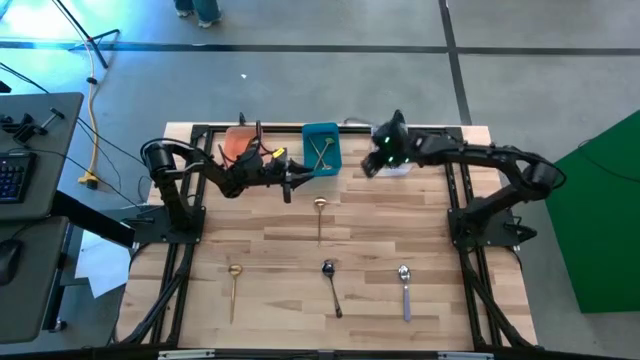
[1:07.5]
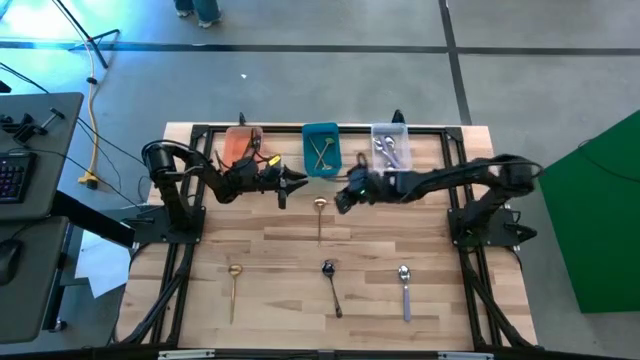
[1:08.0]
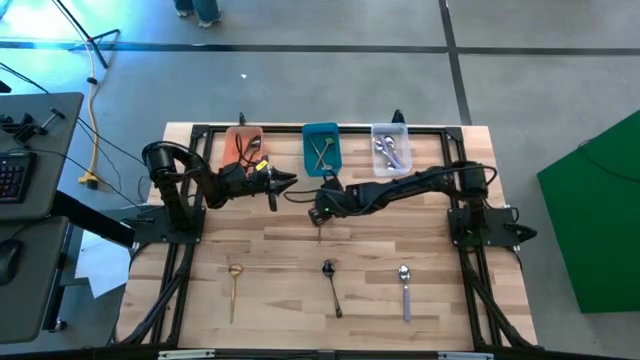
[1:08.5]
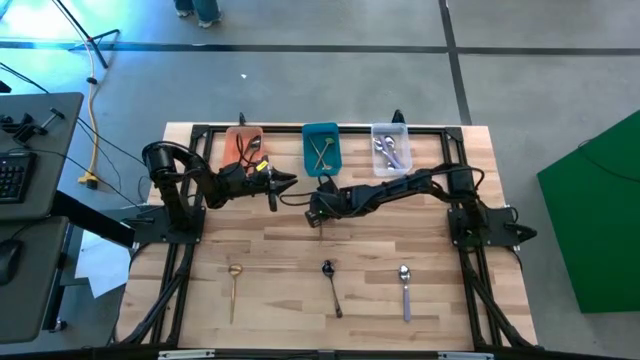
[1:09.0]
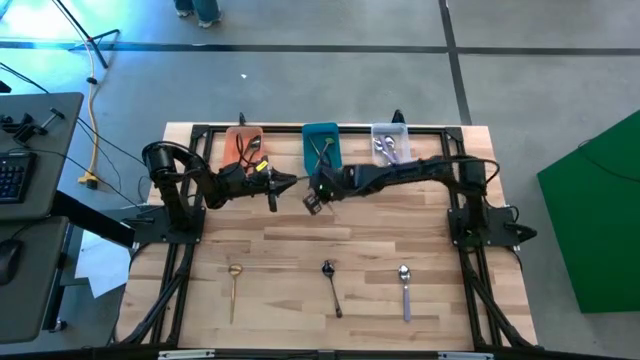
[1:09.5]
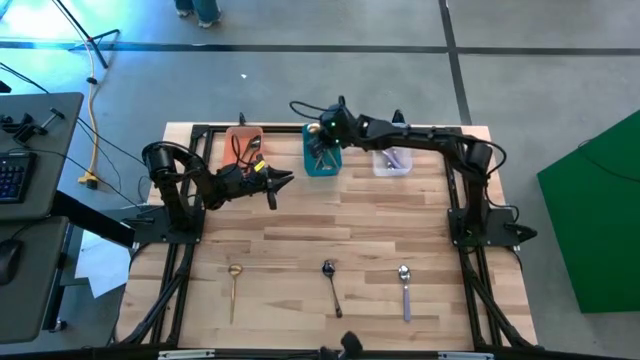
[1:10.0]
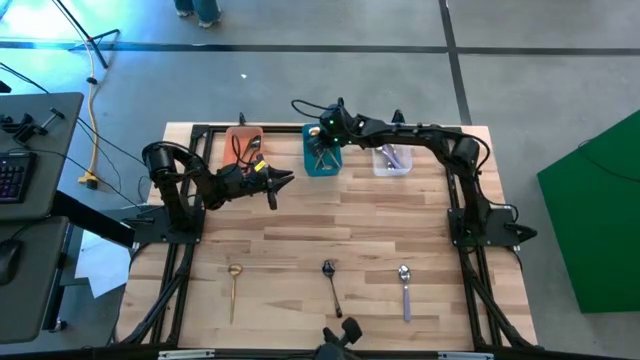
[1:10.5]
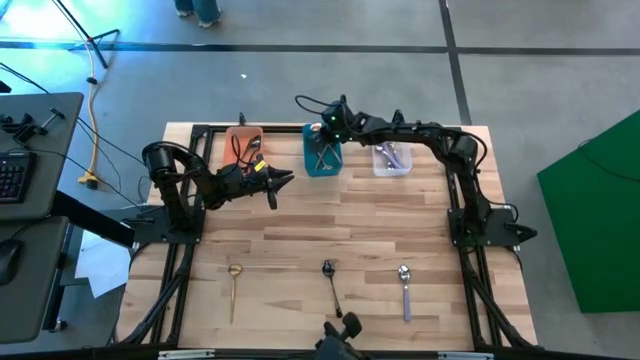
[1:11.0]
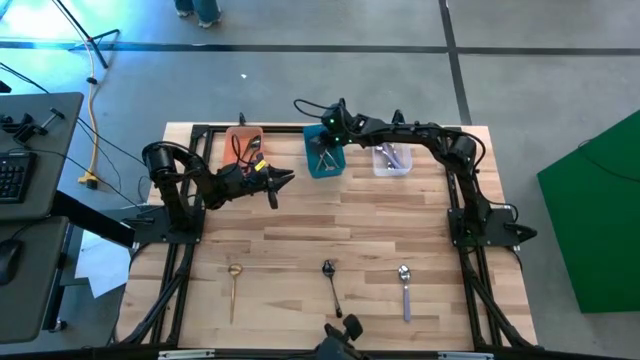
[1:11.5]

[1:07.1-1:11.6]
Task: Sort silverware by color (type)
Put the top gold spoon into the blue bin

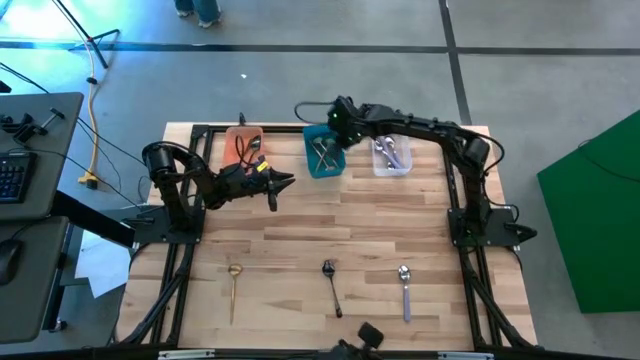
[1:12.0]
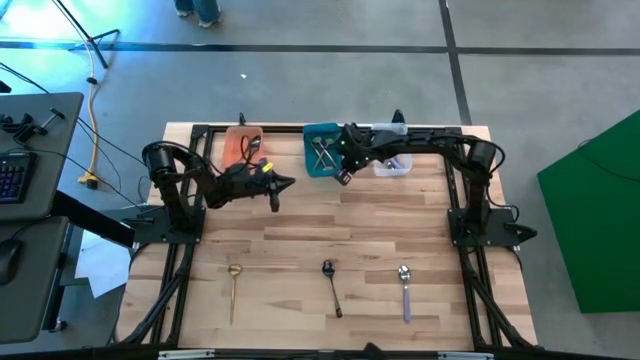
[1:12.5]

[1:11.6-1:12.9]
Adjust the blue bin on the table

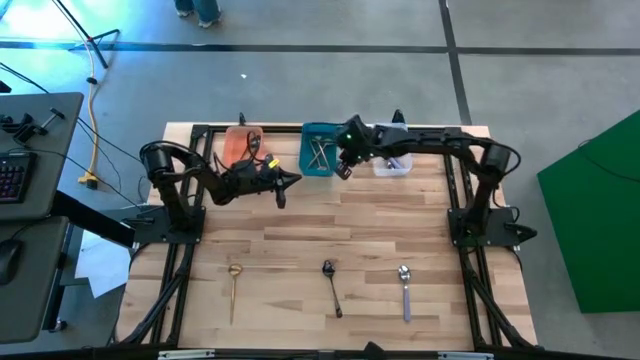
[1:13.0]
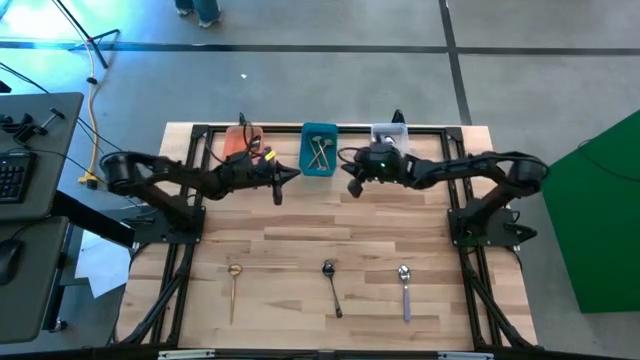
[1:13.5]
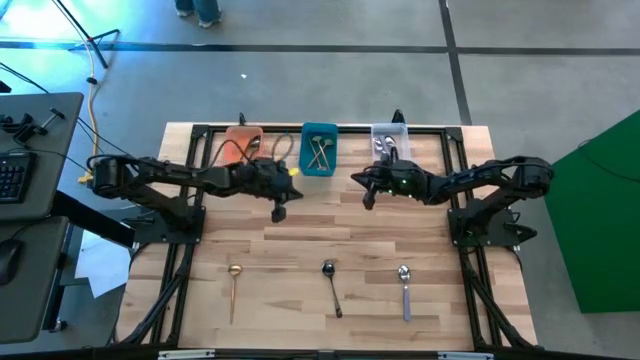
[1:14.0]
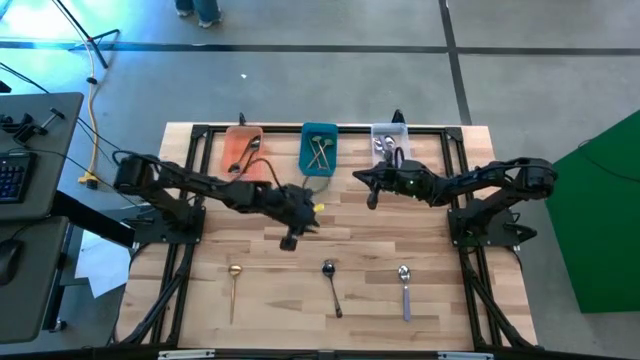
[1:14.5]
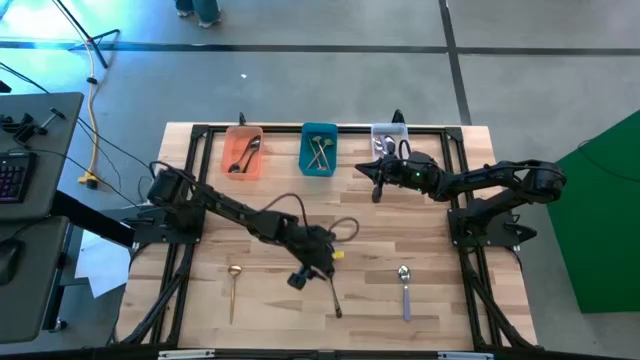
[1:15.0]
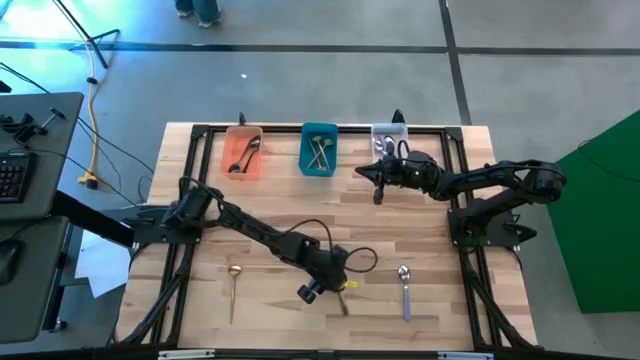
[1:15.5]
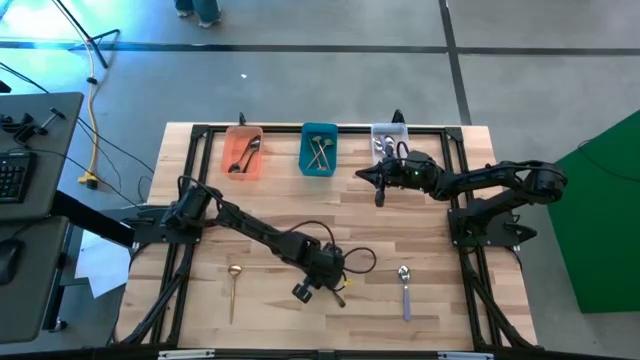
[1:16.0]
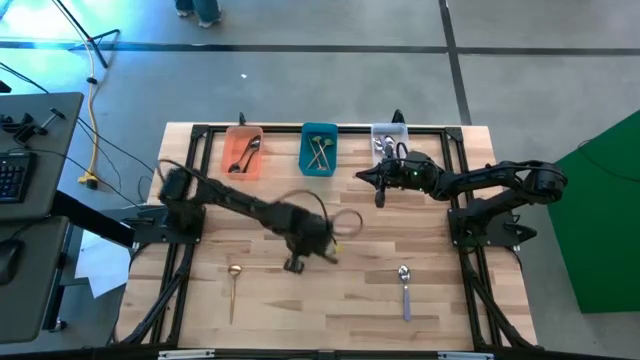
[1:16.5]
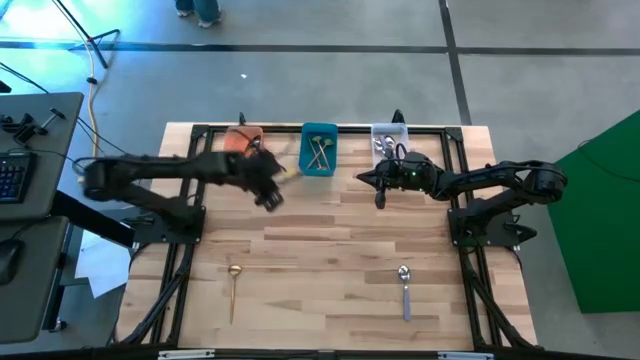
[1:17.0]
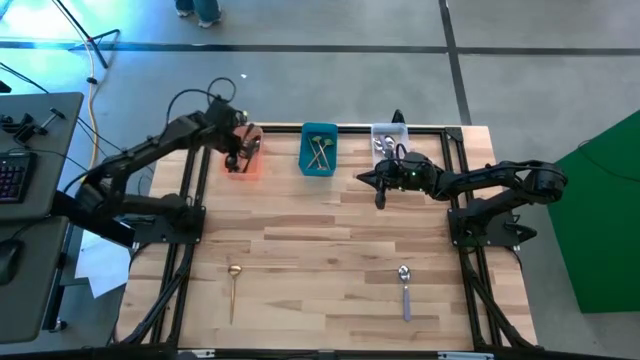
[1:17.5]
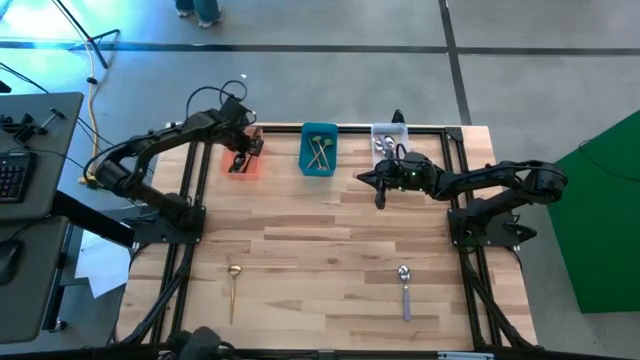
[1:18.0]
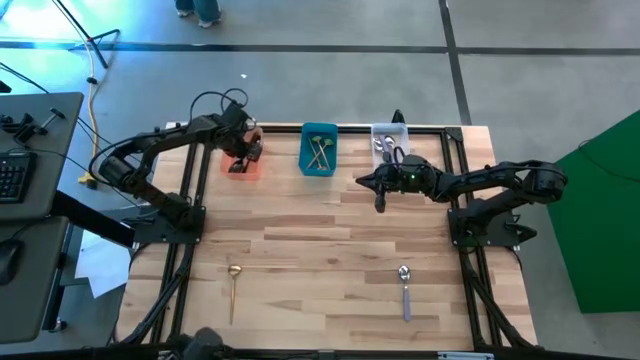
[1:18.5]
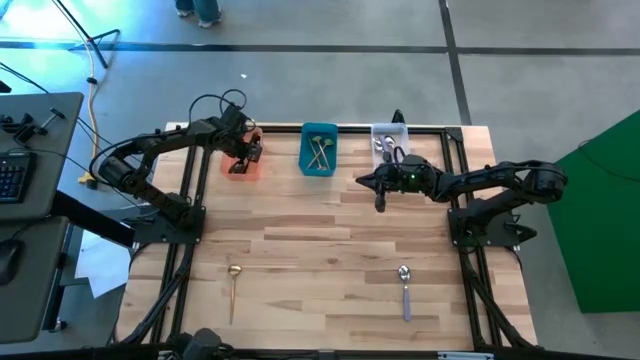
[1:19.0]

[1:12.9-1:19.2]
Put the black spoon into the orange bin

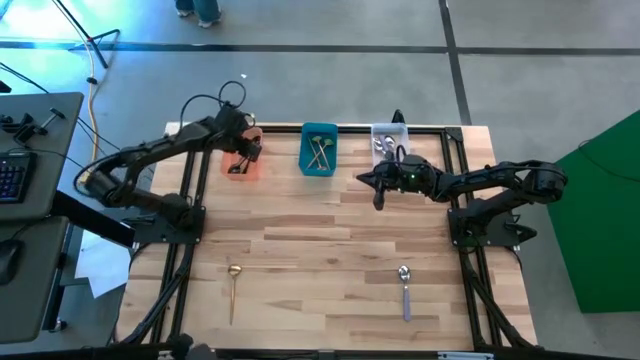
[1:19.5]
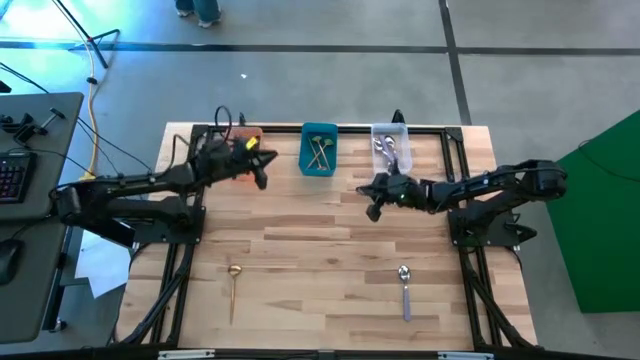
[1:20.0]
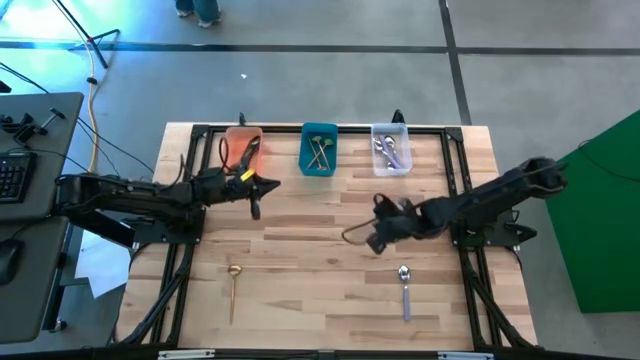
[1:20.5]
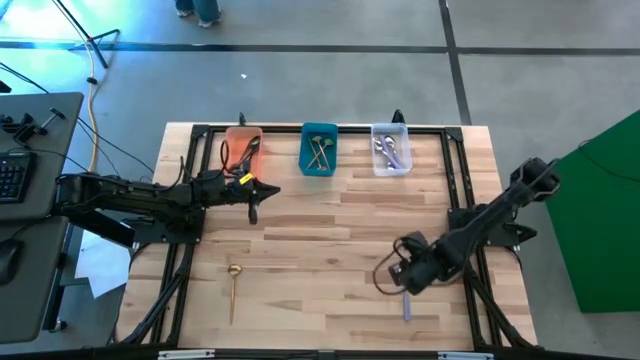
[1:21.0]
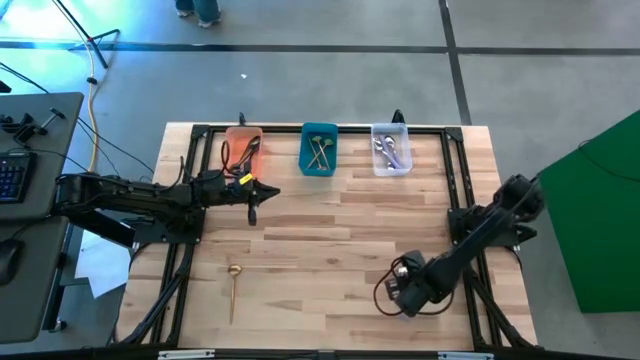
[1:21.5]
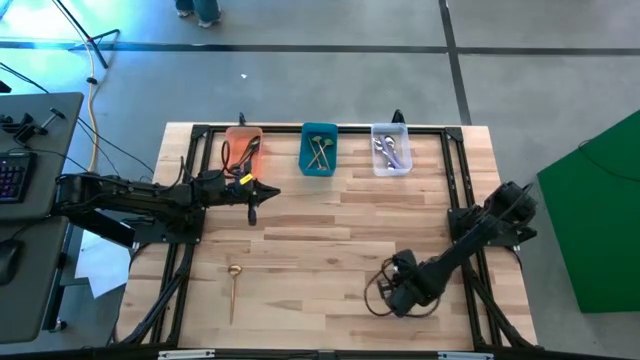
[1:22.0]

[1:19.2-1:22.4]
Put the purple spoon into the transparent bin

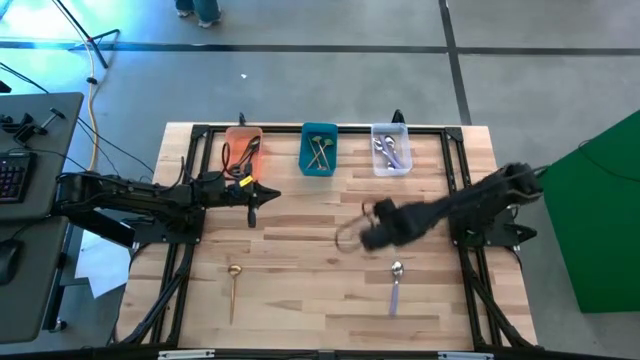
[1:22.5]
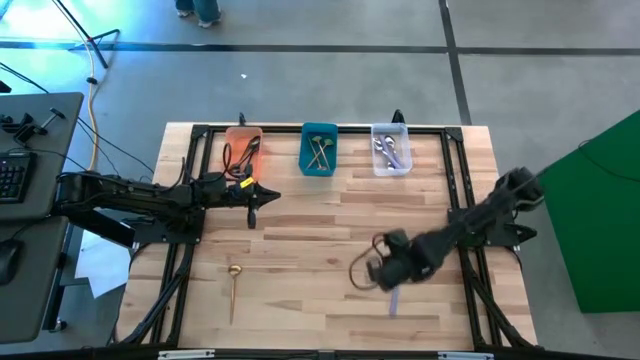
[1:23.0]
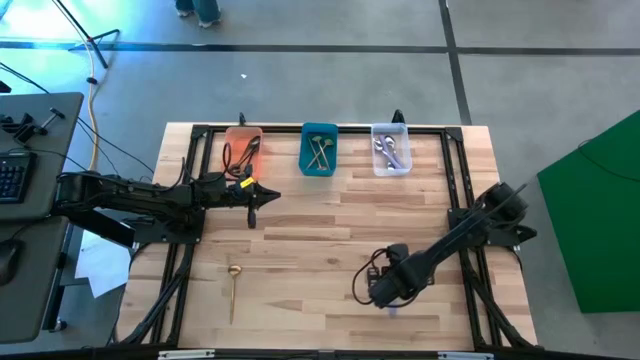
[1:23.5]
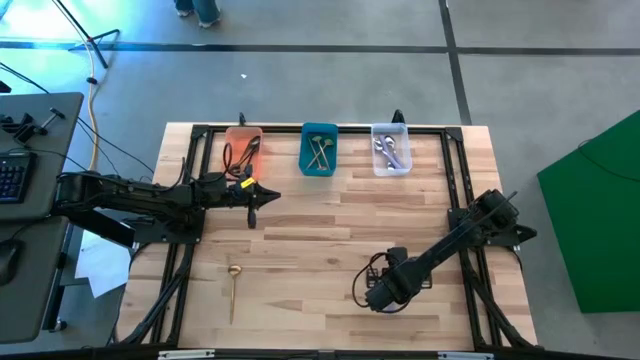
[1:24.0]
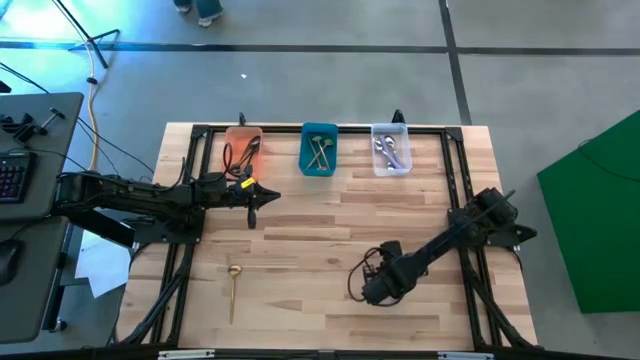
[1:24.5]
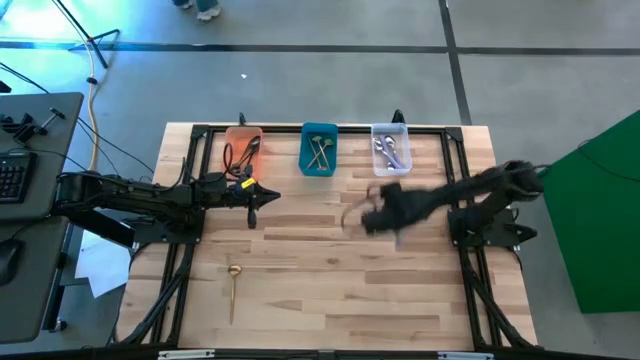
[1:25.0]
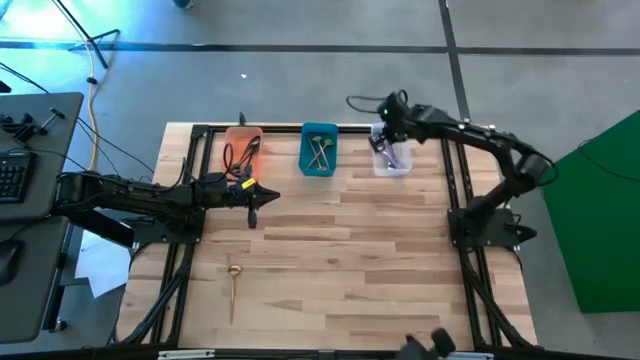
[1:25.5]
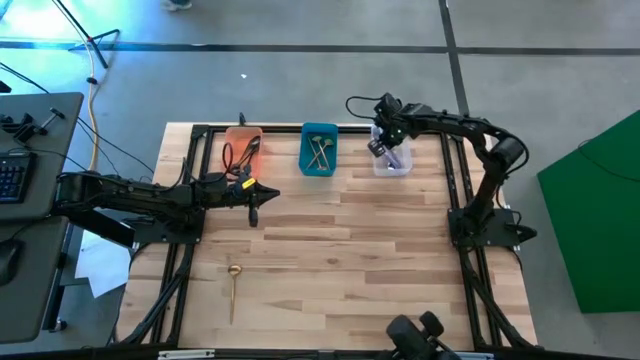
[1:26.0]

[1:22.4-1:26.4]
Put the purple spoon into the transparent bin
